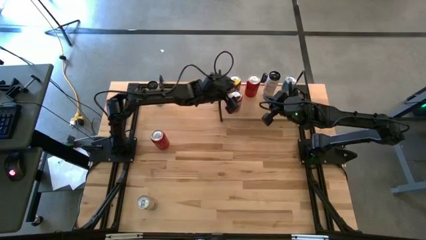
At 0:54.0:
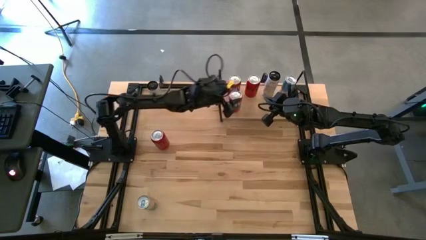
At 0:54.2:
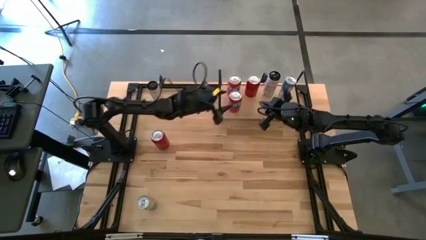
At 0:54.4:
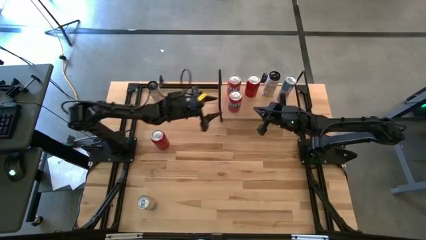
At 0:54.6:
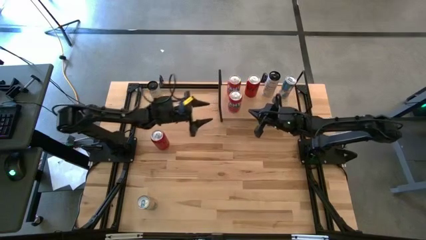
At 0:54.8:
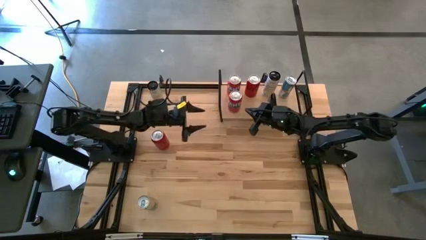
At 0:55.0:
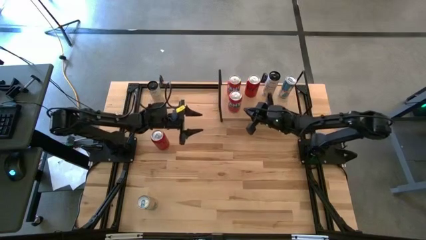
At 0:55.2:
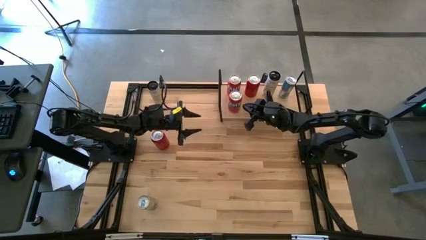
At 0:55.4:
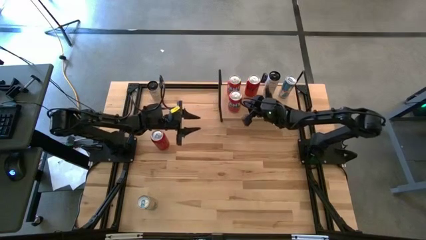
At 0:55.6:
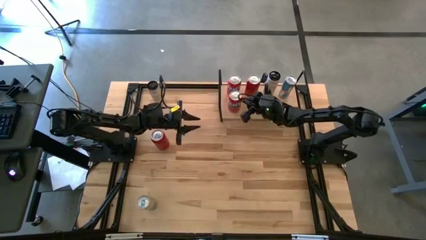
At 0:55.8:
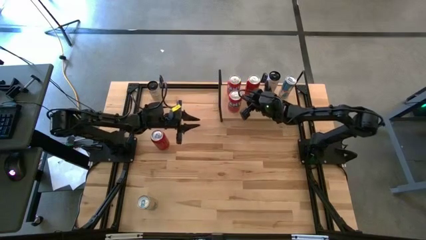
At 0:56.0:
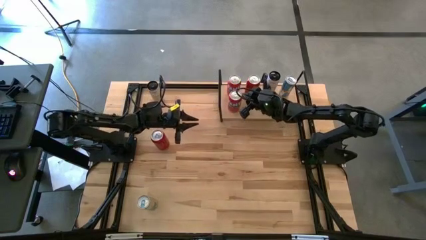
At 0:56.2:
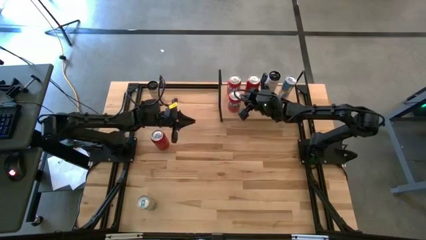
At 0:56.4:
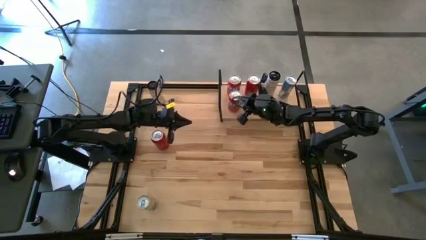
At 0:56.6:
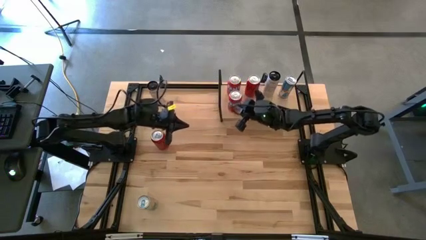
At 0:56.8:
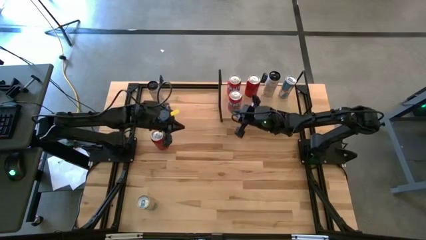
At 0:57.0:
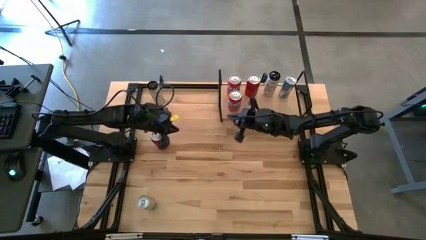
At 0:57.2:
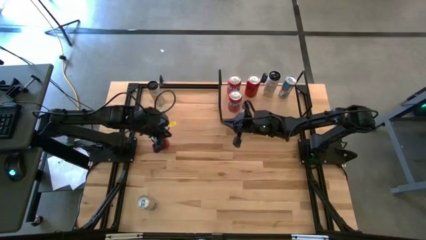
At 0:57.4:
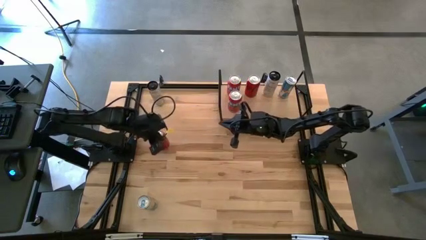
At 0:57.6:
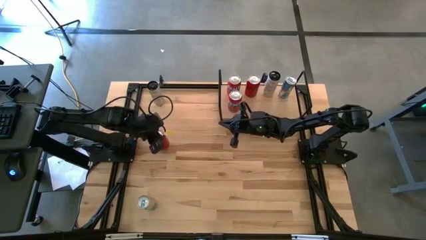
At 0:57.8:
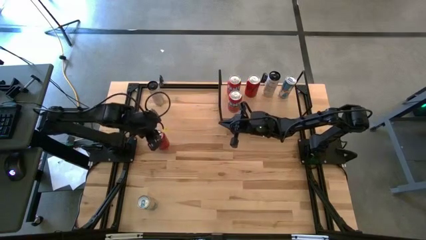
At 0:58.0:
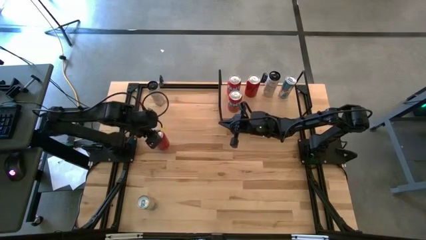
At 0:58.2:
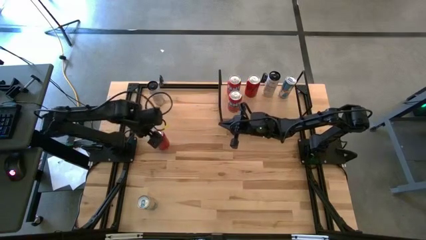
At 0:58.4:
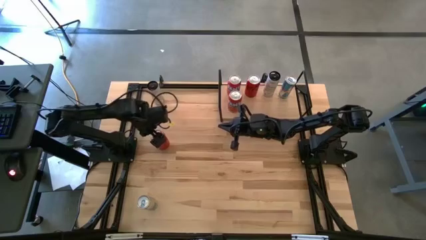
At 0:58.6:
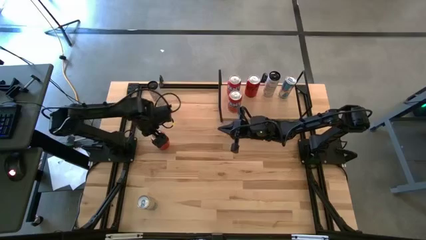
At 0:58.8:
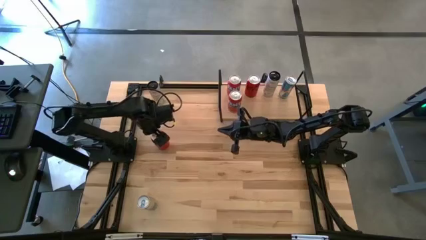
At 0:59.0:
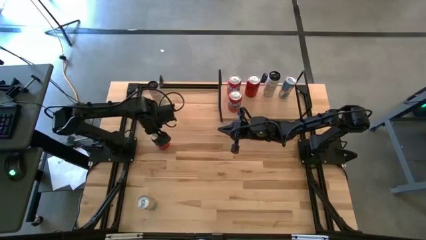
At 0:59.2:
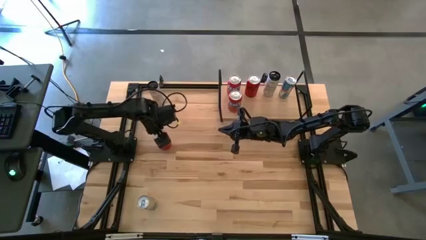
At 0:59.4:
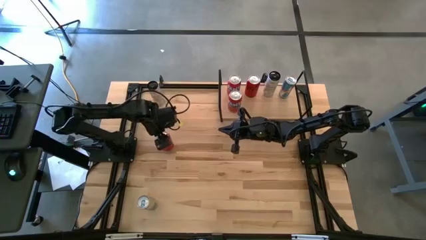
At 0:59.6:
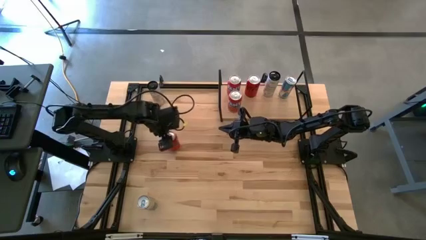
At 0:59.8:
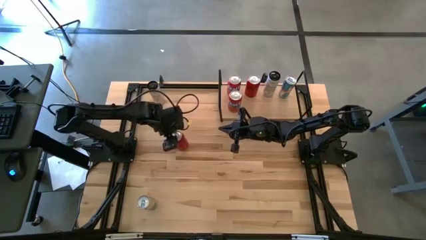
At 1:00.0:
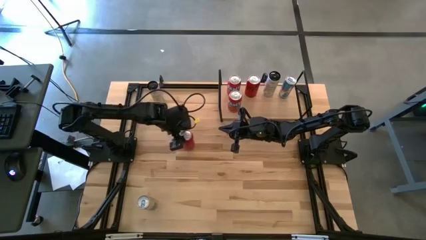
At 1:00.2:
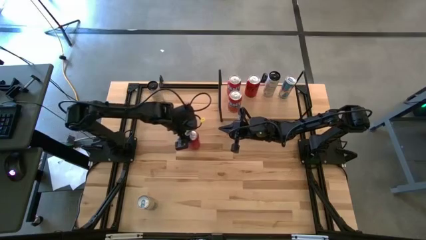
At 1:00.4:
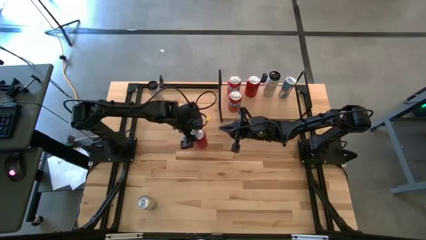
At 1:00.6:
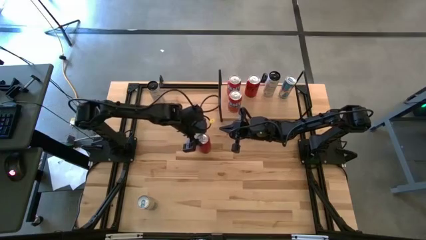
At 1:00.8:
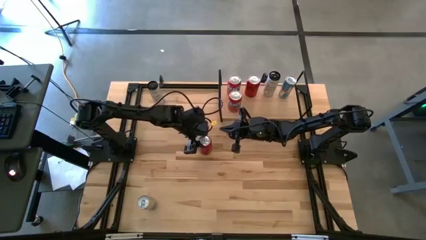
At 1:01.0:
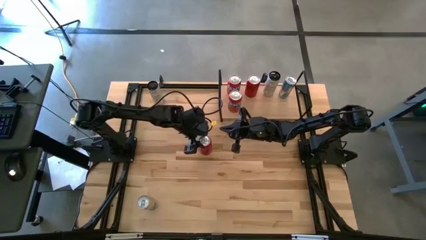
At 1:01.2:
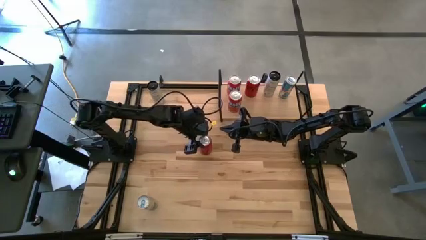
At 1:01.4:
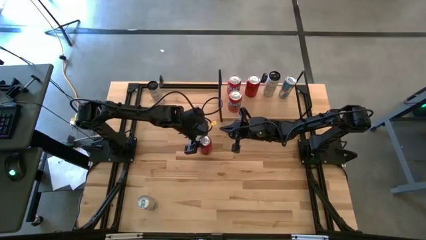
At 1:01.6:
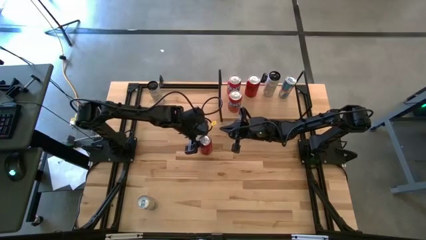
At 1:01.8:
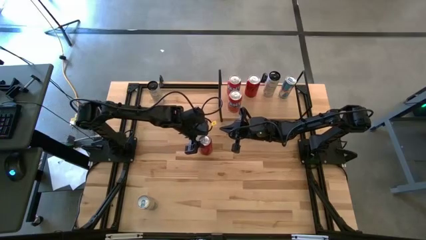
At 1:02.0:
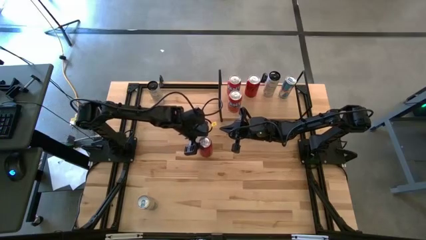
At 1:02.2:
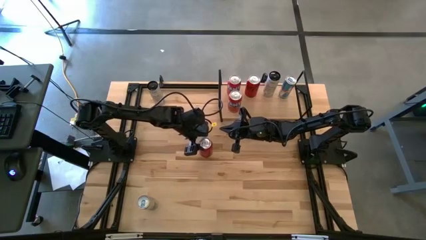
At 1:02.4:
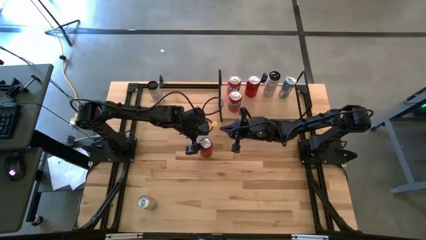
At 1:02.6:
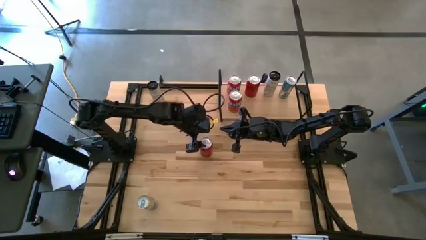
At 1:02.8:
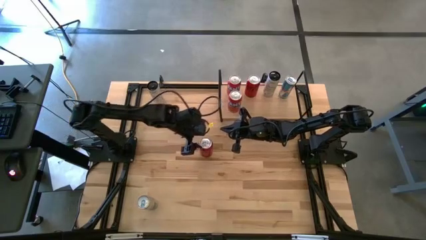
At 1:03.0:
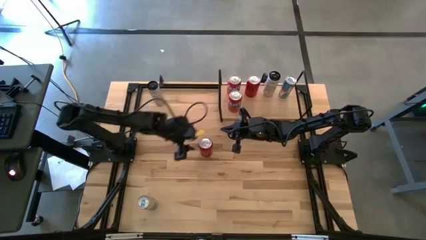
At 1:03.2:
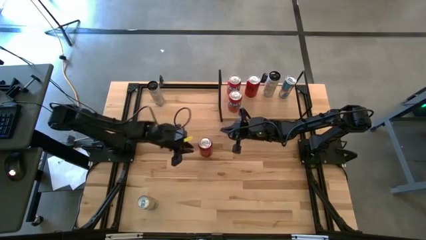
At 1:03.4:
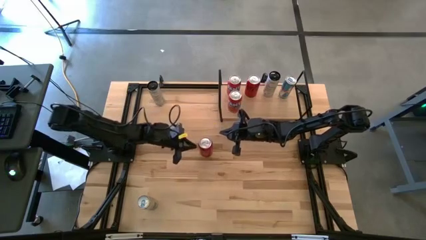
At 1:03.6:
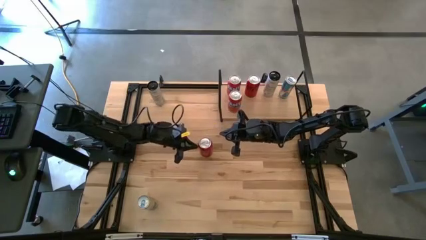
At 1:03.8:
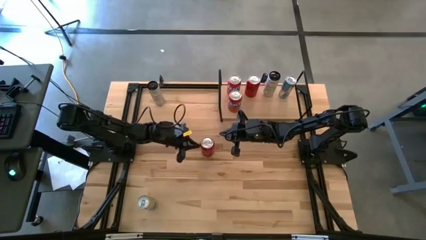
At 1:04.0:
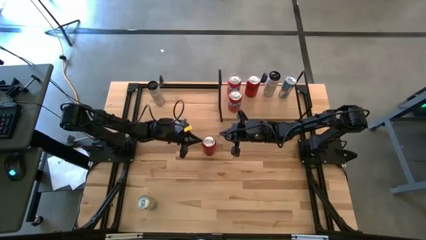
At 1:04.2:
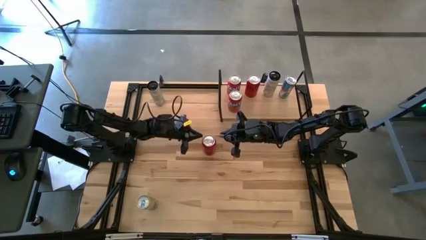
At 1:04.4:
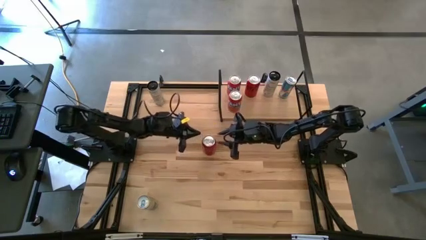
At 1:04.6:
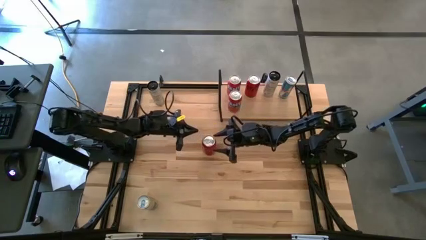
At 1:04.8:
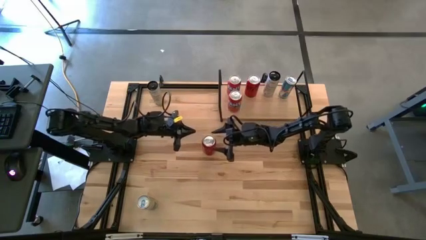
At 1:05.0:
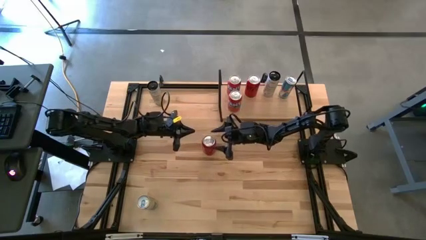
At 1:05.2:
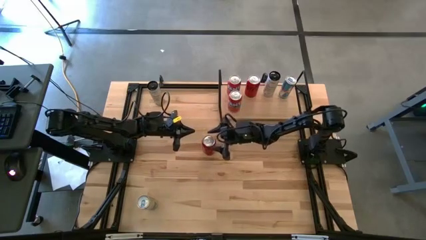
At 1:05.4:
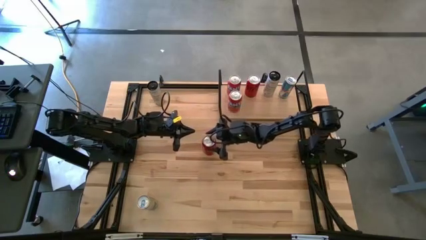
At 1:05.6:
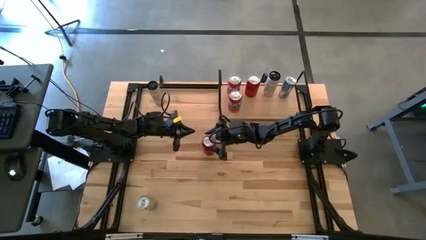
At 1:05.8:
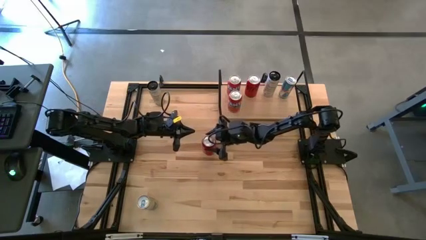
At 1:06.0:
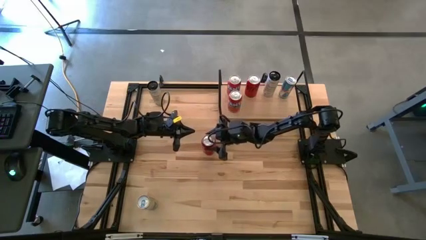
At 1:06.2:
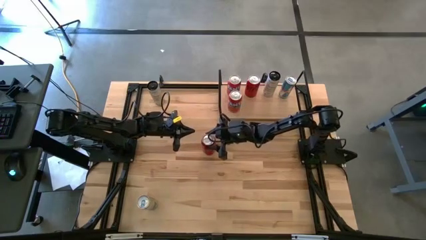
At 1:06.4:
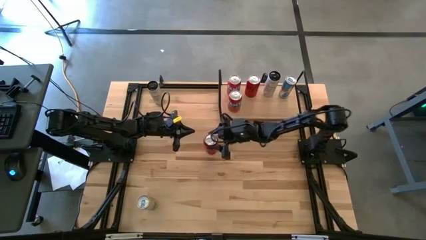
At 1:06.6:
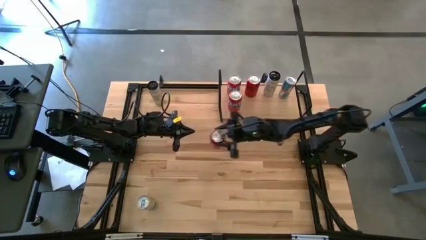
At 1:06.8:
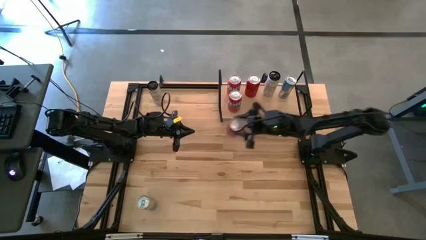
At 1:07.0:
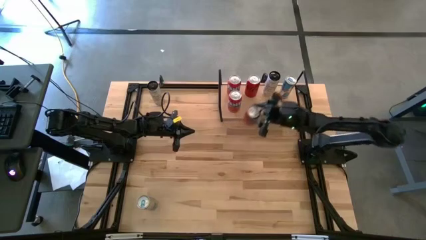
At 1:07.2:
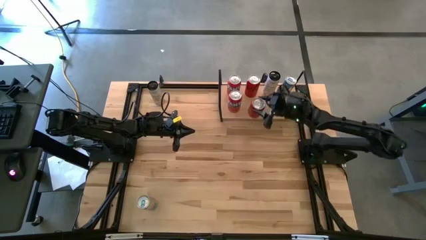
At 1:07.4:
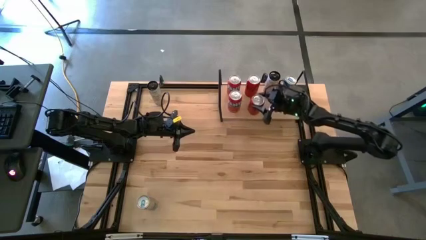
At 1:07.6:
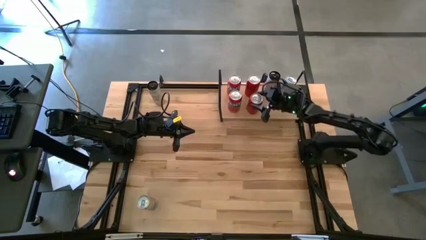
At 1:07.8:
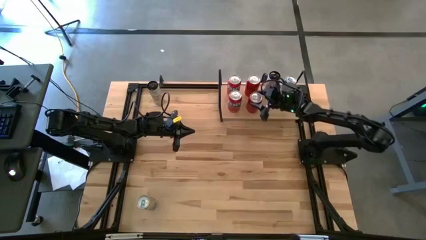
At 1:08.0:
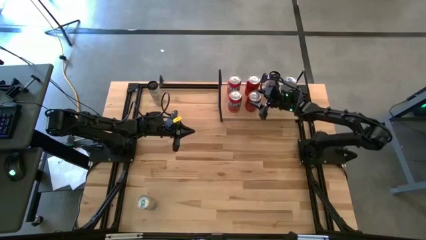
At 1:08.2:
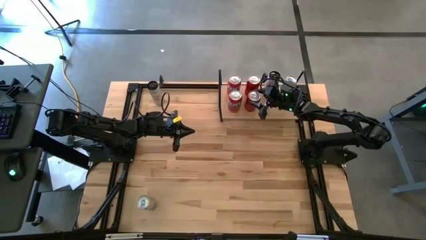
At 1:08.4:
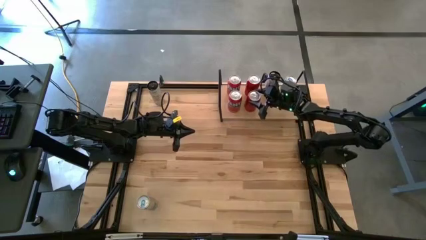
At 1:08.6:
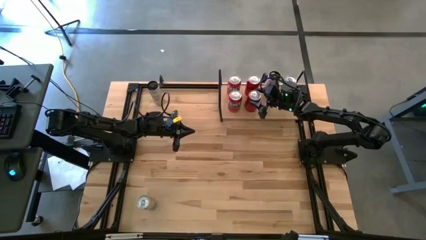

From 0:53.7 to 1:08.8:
Task: Place canned beverage on shelf
Put the red black soda can on the shelf aligned with the red black soda can
